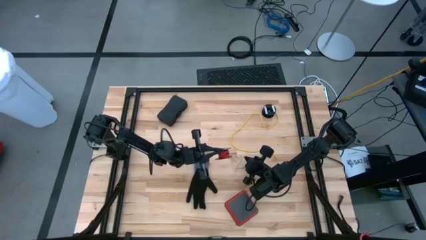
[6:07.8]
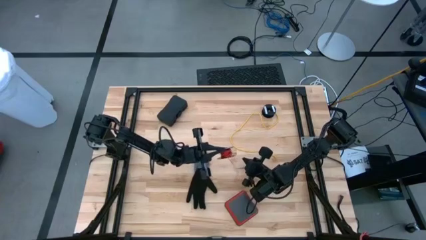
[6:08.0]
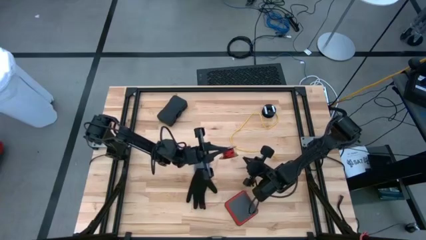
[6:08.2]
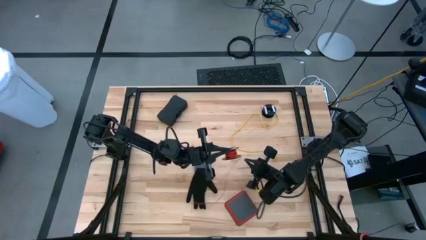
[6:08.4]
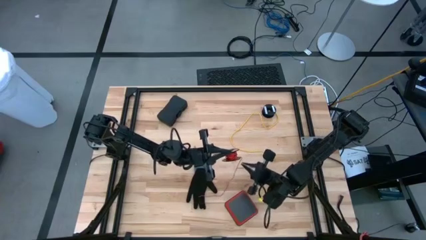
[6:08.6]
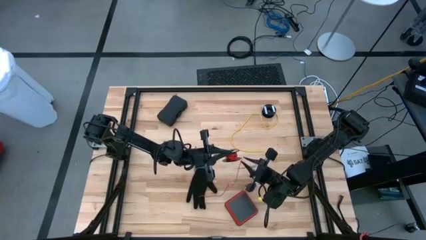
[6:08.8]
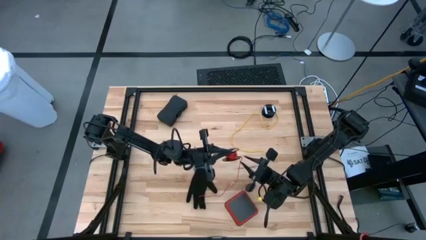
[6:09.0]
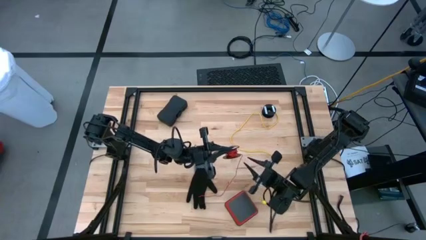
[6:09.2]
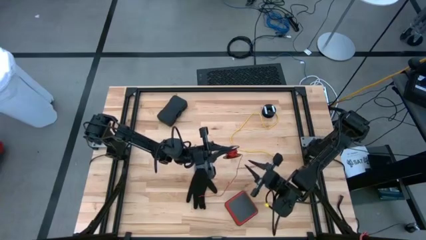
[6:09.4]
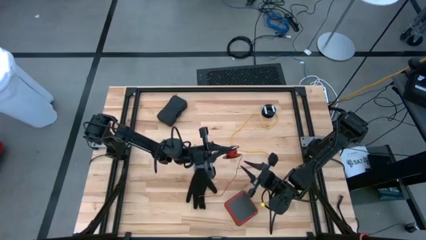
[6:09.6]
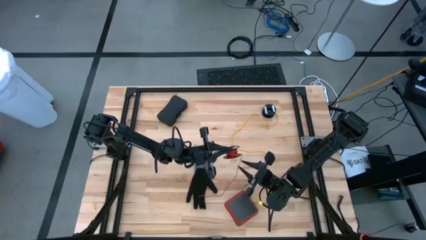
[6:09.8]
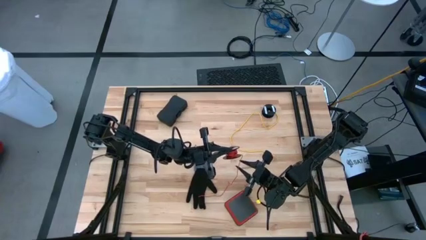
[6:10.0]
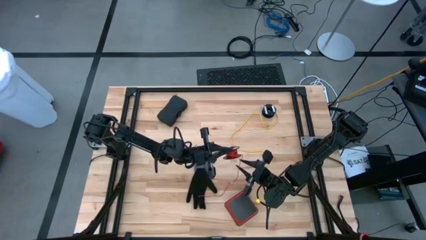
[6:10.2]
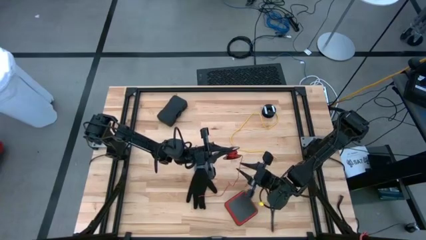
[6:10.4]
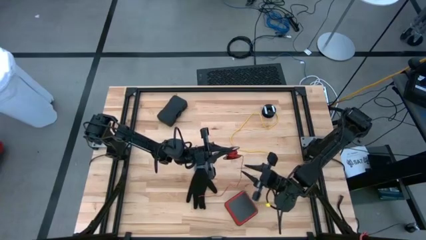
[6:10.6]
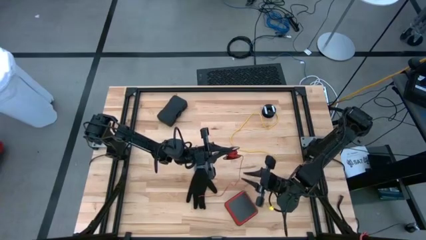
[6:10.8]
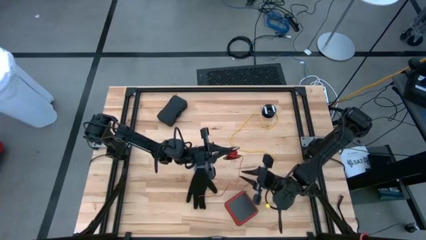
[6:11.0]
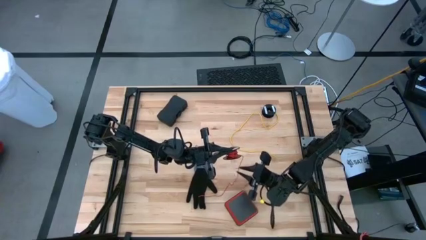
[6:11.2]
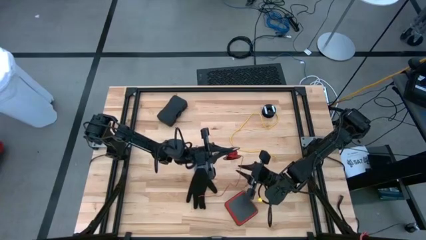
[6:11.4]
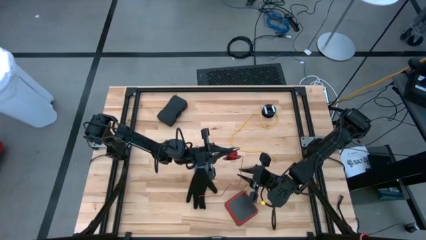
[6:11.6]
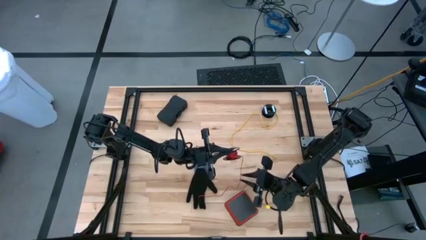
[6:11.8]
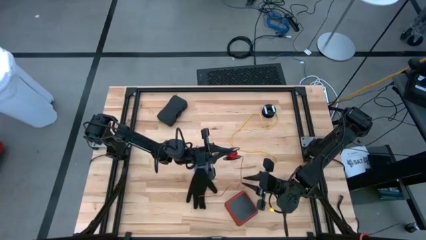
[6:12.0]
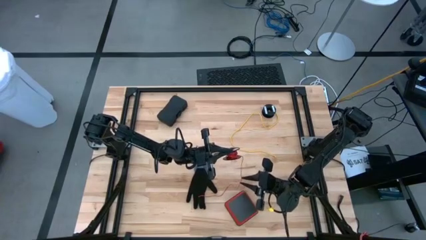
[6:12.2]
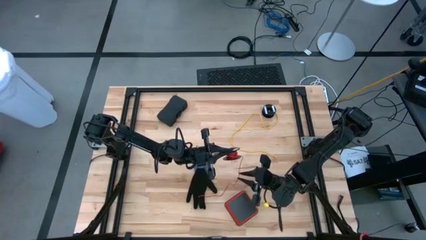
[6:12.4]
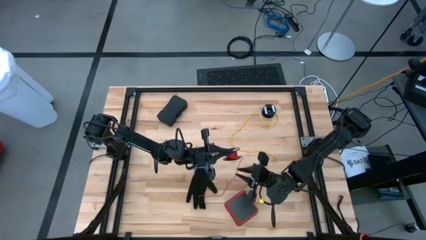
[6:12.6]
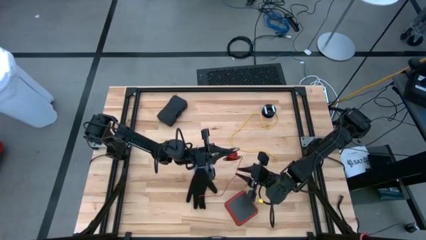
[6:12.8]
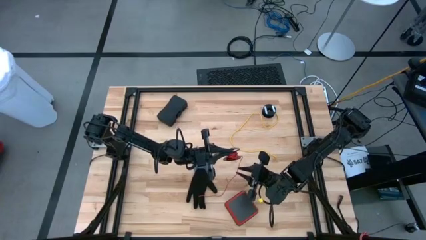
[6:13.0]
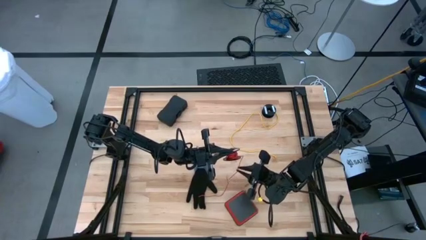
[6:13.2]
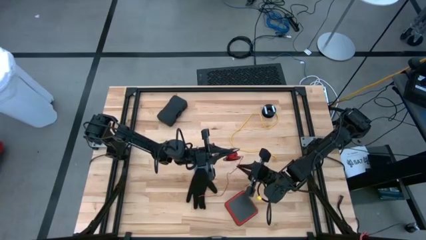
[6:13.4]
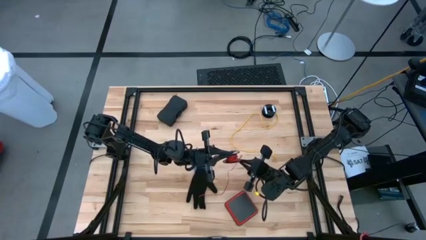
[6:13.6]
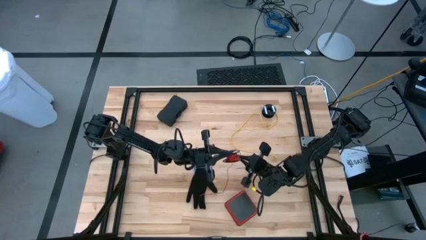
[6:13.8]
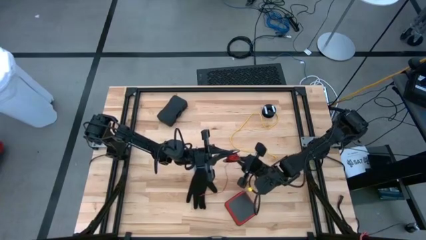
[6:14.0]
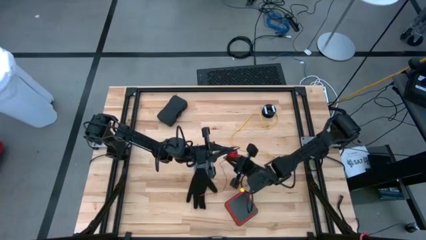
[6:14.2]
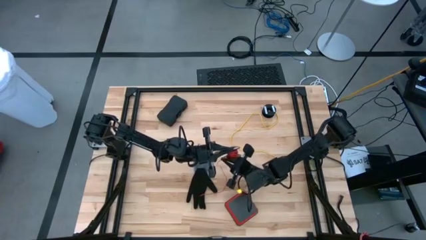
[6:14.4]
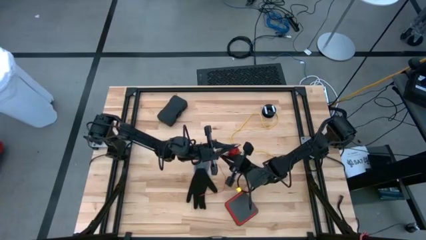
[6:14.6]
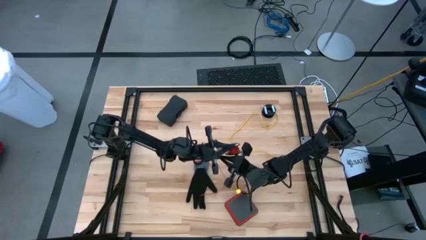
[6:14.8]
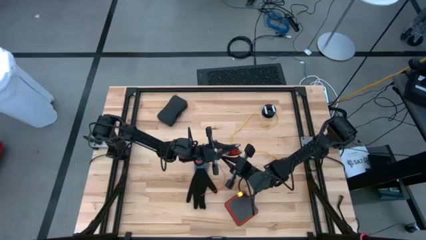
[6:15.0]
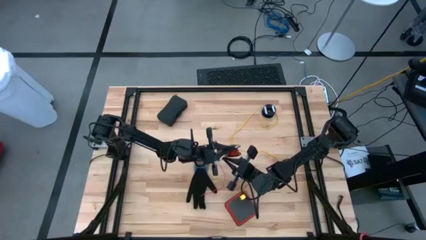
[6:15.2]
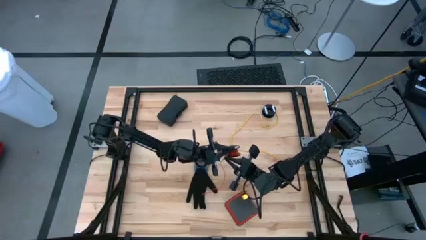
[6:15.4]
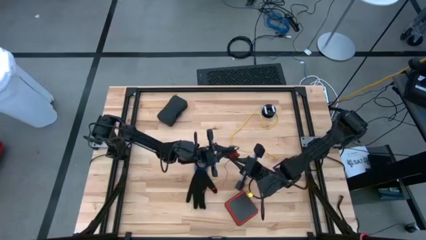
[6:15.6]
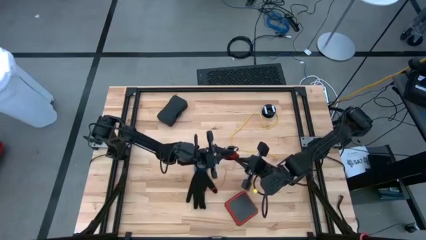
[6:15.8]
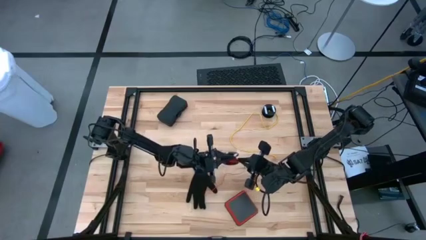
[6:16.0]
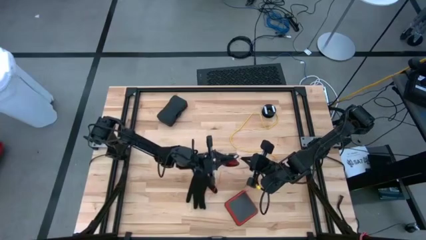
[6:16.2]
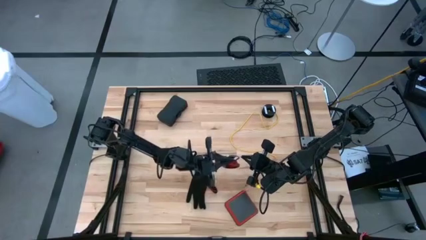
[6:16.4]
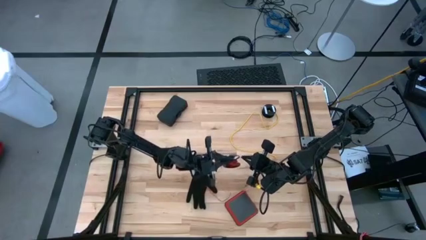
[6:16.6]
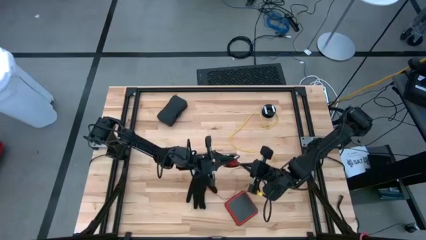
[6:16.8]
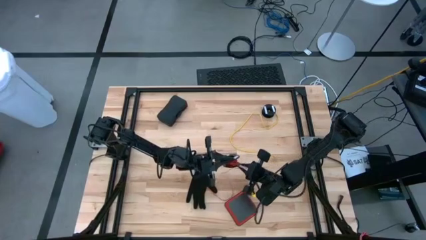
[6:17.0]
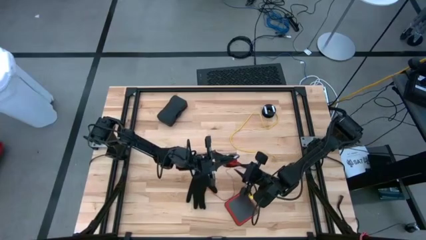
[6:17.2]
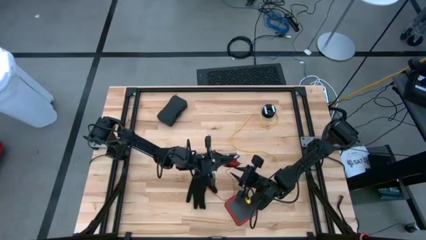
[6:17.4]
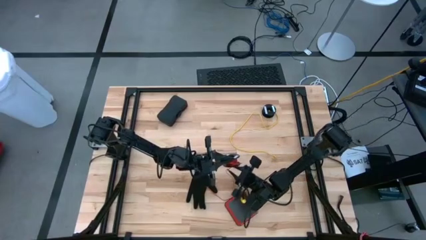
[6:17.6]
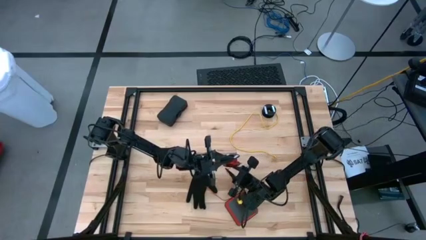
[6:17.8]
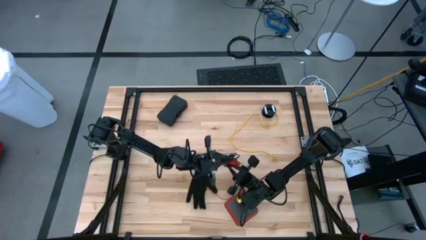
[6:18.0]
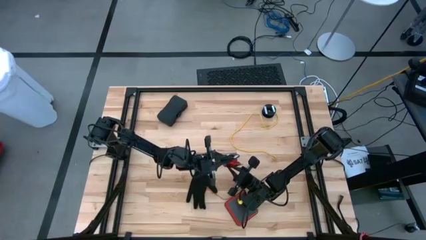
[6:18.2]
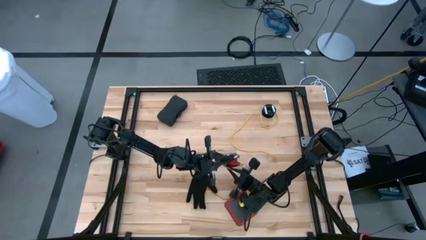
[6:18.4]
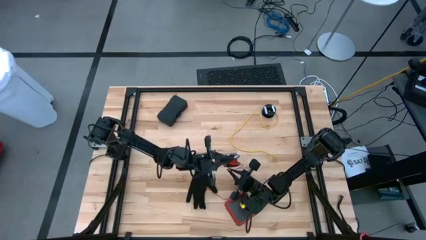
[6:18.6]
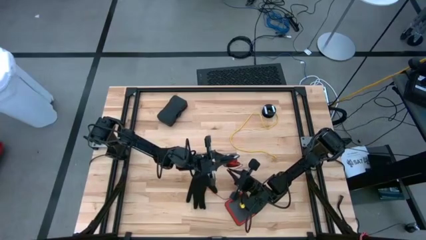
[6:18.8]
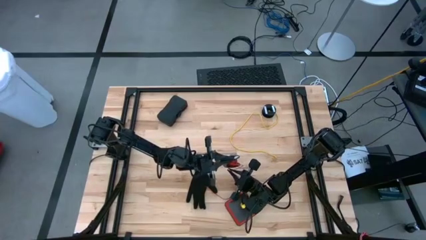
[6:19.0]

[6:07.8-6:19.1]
Task: Coil cords
Coil the red wire onto the black spool

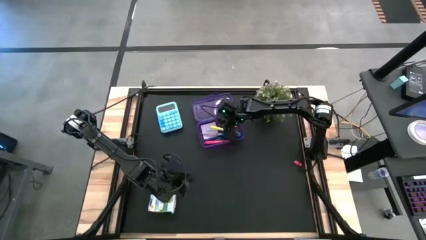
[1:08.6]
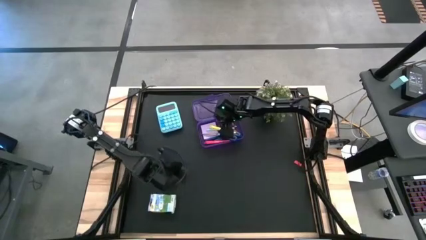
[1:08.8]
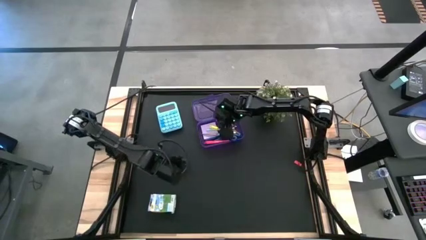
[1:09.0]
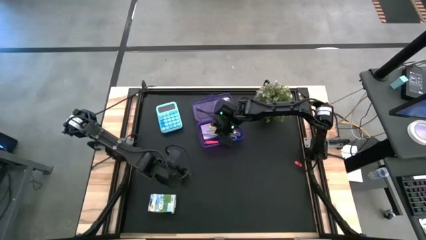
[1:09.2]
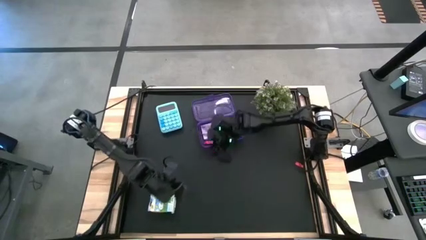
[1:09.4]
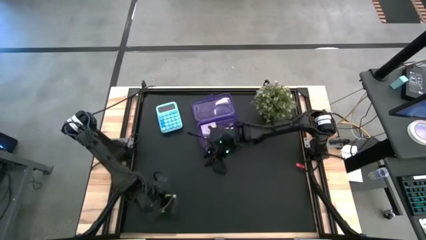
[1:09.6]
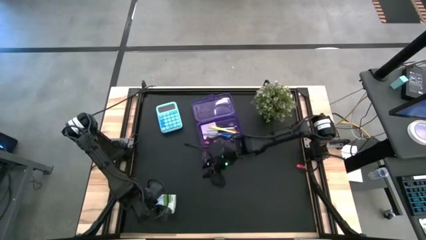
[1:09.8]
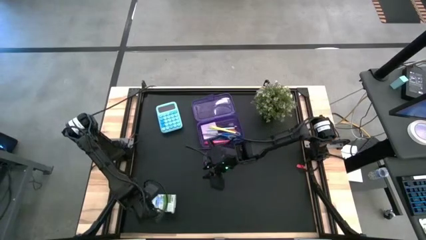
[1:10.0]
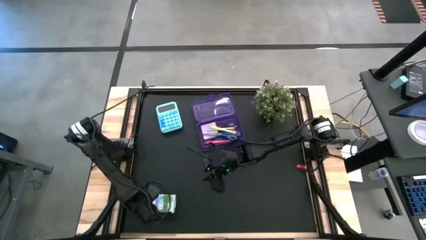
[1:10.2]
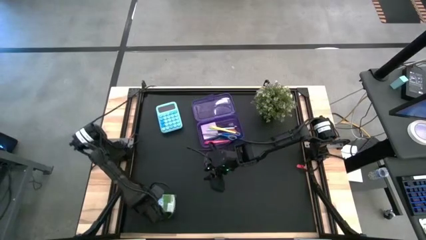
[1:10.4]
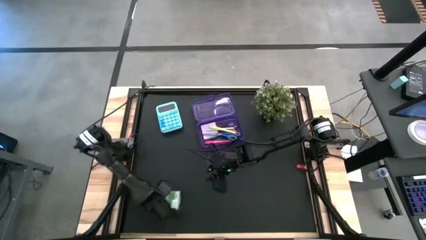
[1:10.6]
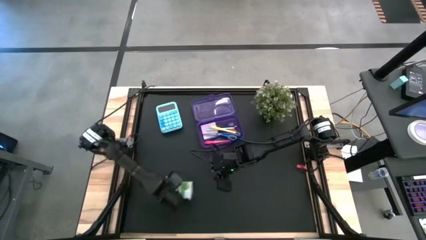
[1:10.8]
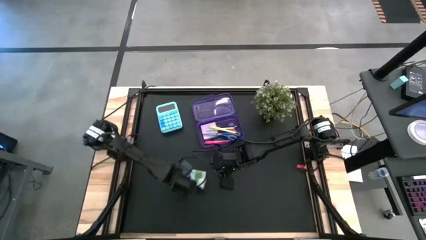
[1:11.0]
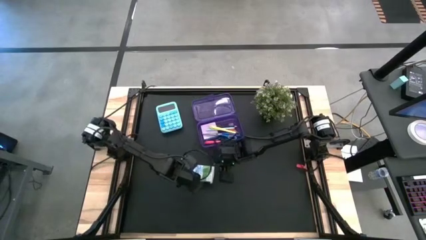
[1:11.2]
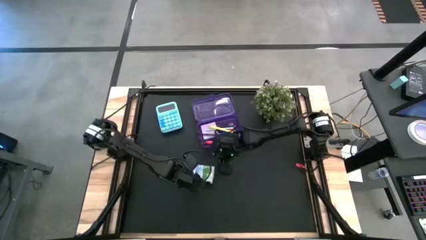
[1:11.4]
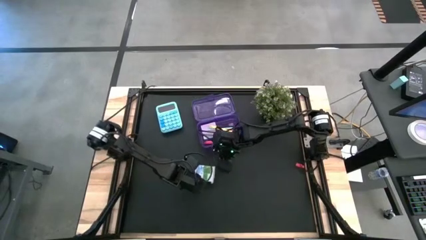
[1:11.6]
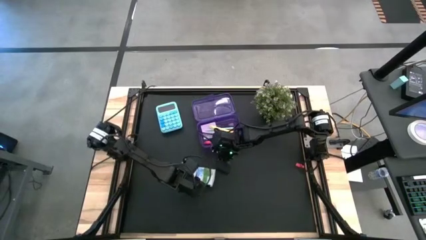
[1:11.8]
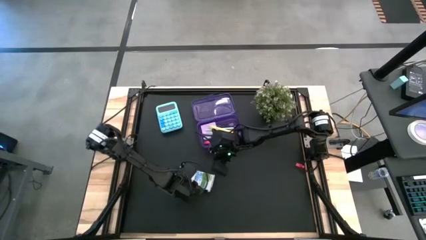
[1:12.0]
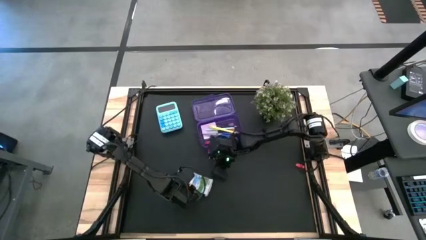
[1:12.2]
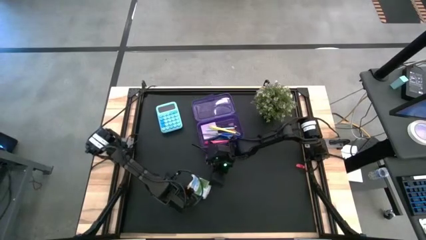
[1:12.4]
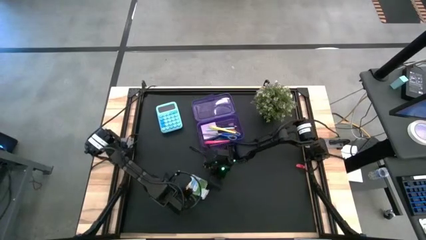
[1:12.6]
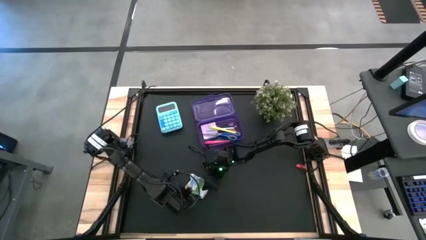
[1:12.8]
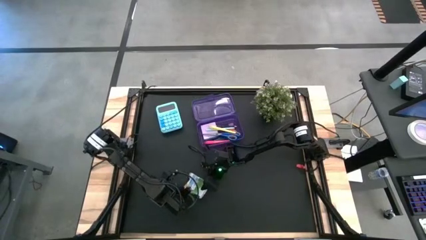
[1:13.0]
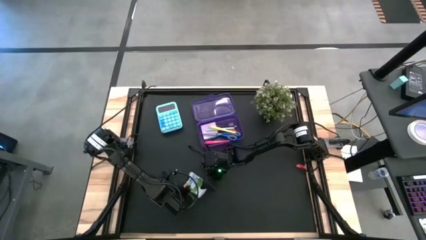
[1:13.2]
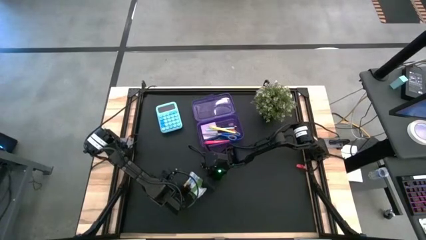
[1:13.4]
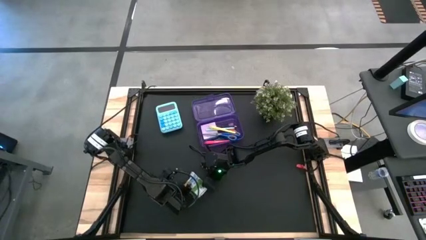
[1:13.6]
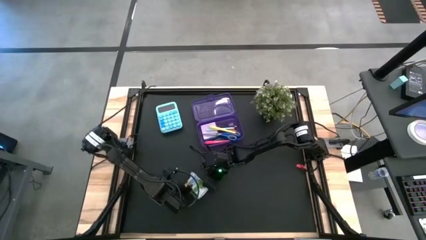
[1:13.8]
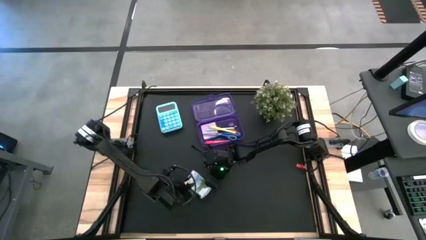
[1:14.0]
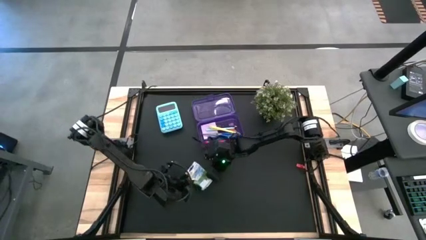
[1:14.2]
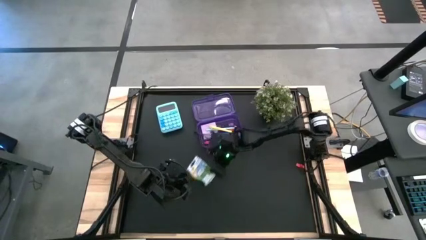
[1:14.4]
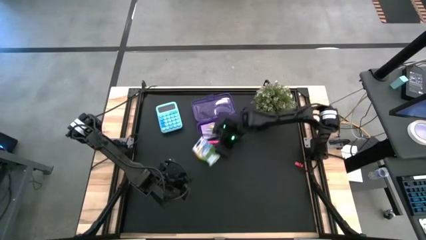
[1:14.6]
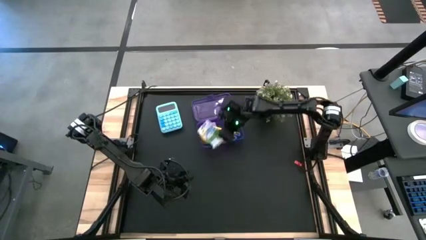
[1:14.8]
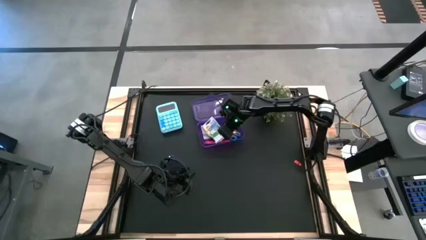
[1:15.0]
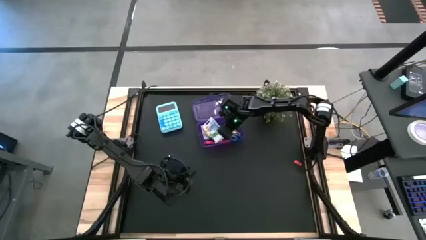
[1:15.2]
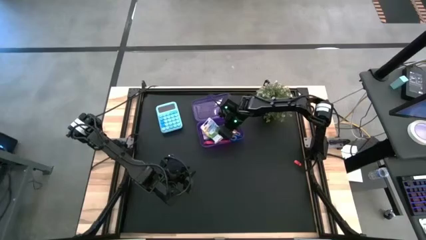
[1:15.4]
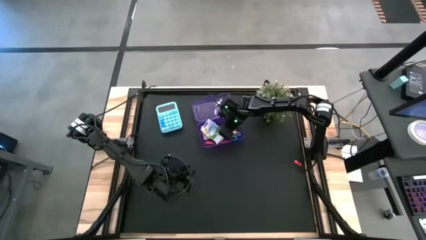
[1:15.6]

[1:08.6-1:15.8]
Task: Pack school essentials
Put the yellow crayon box into the purple supply box
